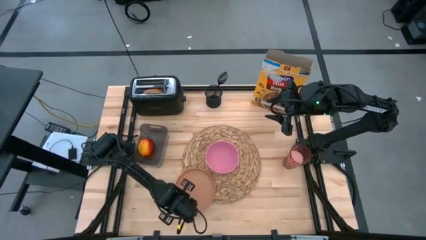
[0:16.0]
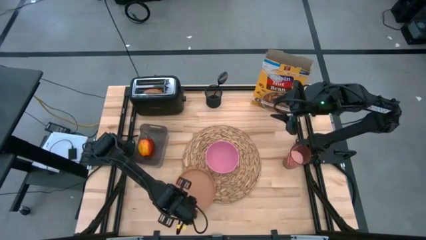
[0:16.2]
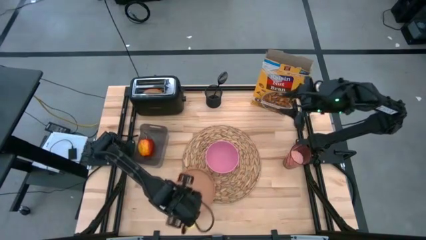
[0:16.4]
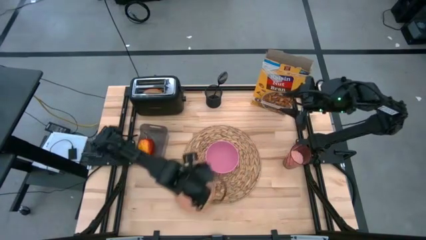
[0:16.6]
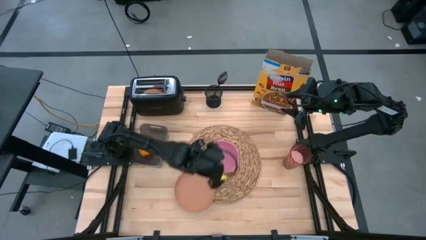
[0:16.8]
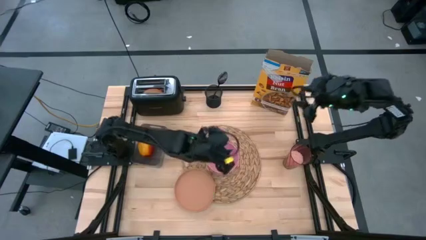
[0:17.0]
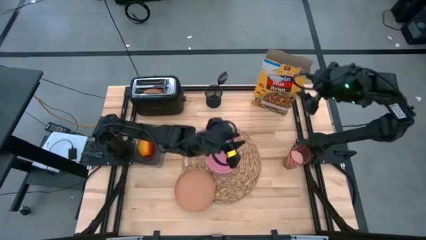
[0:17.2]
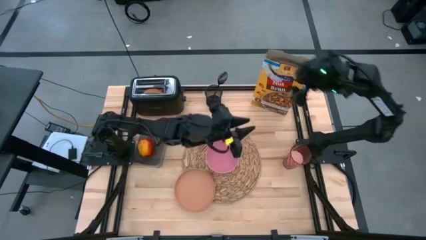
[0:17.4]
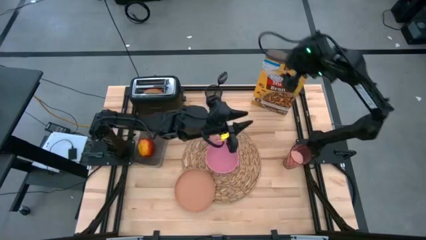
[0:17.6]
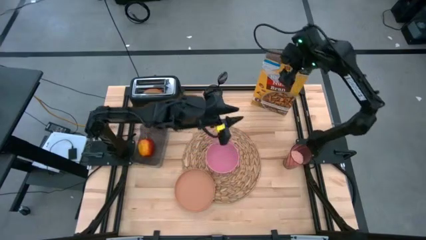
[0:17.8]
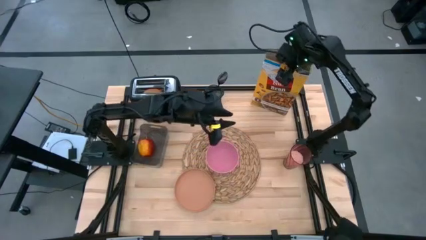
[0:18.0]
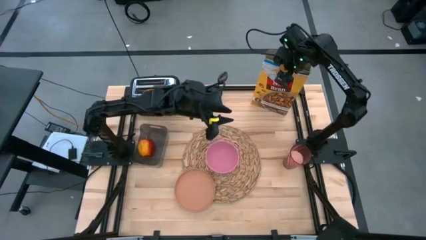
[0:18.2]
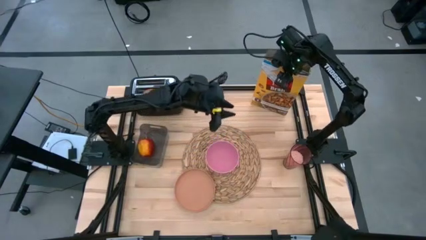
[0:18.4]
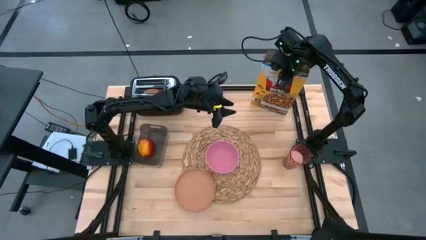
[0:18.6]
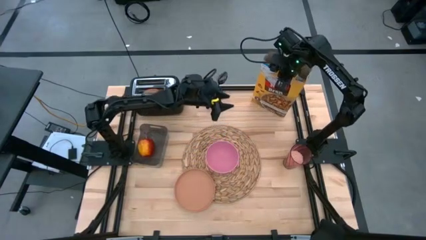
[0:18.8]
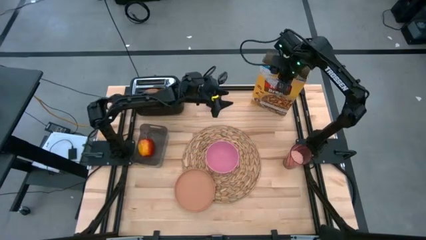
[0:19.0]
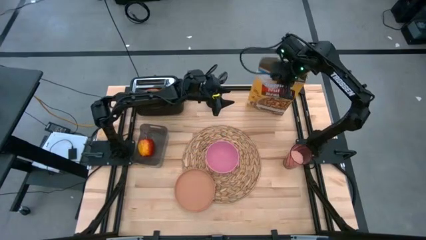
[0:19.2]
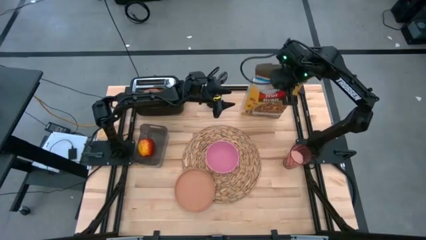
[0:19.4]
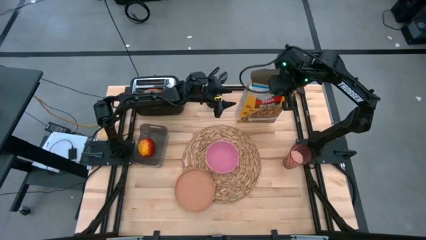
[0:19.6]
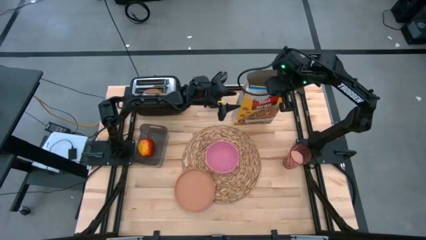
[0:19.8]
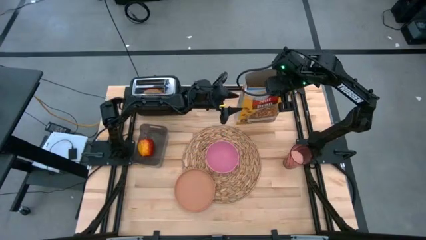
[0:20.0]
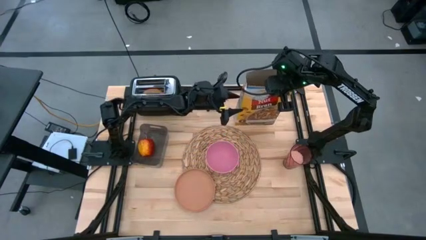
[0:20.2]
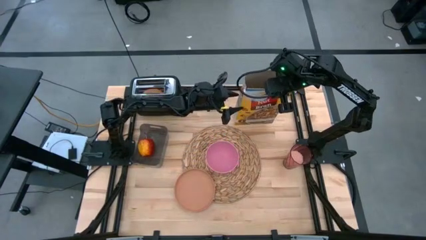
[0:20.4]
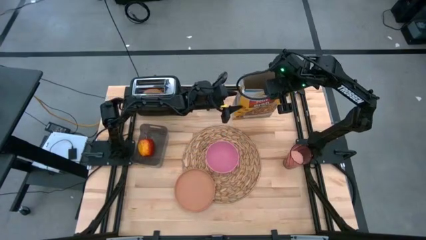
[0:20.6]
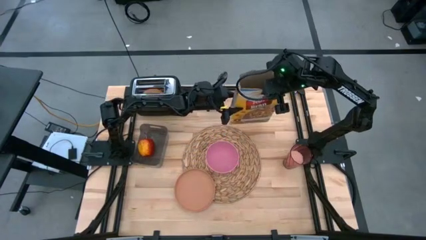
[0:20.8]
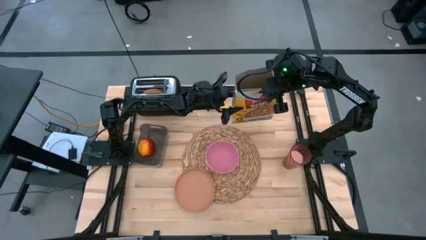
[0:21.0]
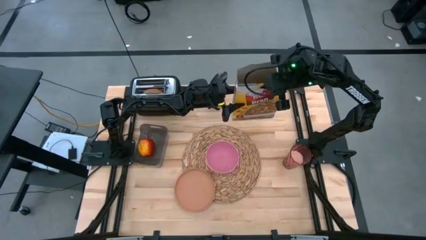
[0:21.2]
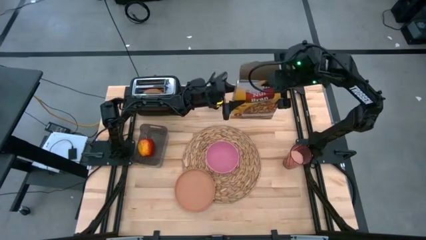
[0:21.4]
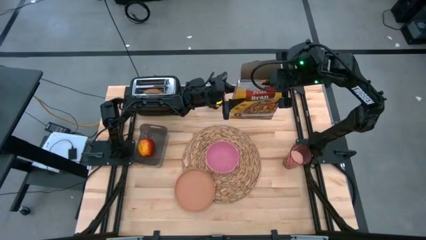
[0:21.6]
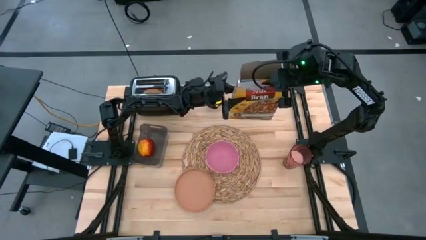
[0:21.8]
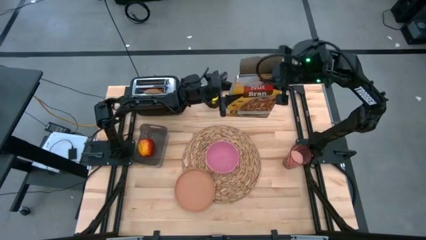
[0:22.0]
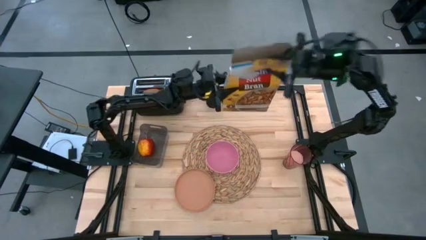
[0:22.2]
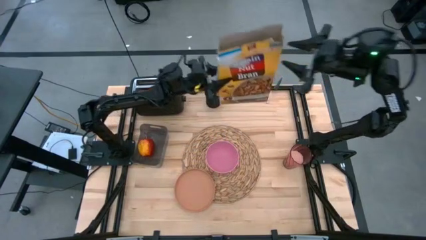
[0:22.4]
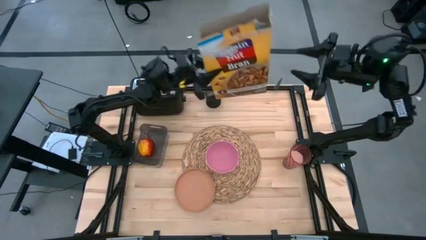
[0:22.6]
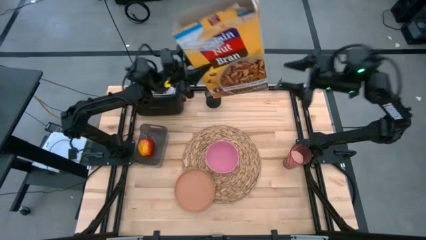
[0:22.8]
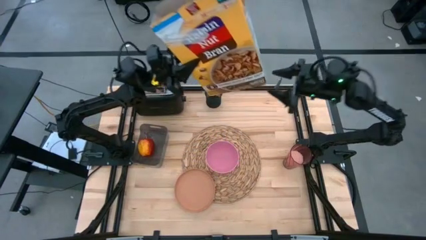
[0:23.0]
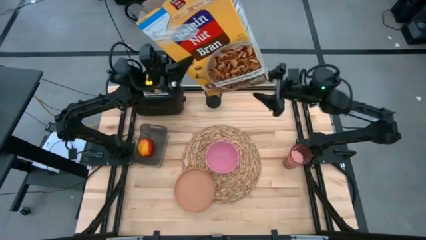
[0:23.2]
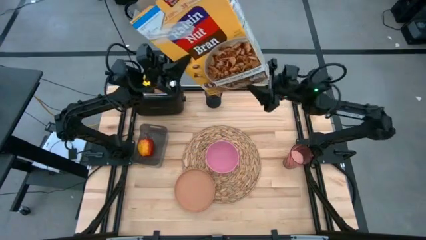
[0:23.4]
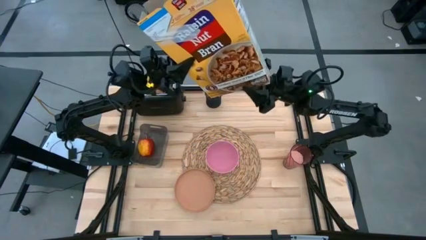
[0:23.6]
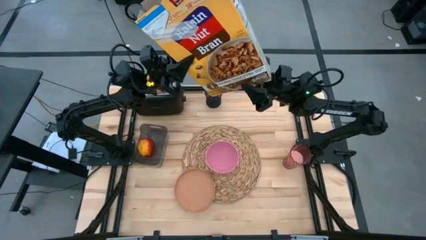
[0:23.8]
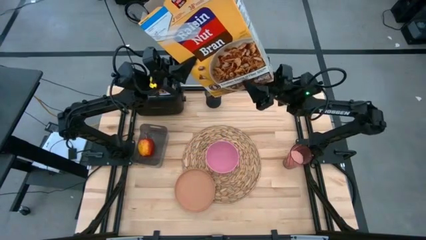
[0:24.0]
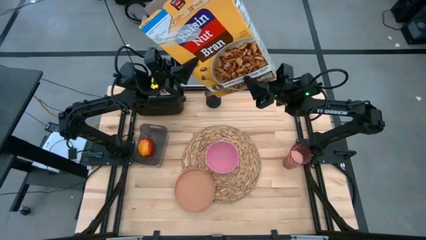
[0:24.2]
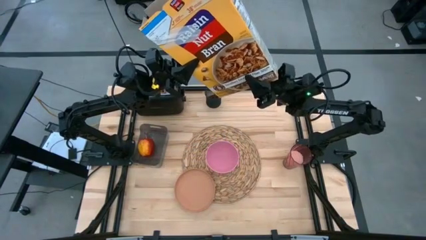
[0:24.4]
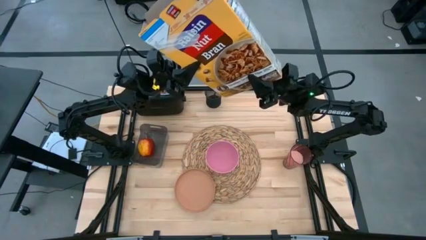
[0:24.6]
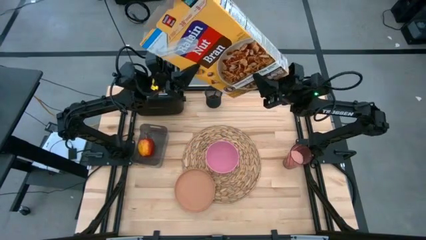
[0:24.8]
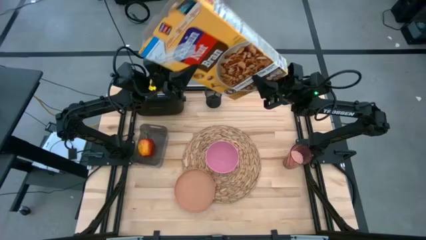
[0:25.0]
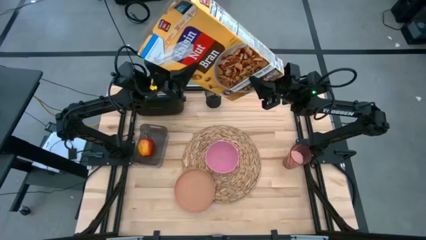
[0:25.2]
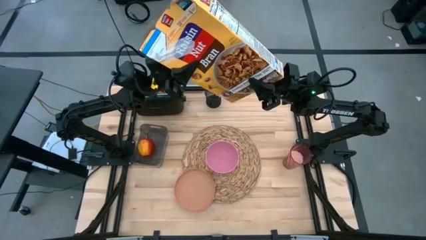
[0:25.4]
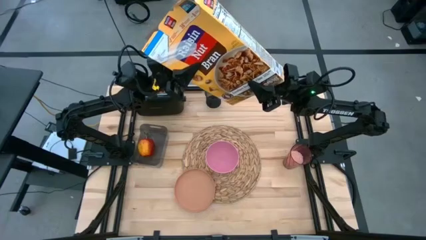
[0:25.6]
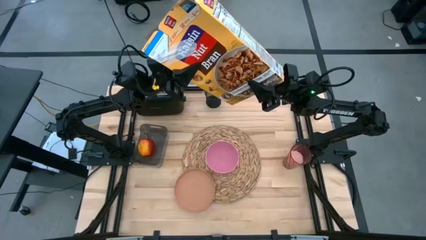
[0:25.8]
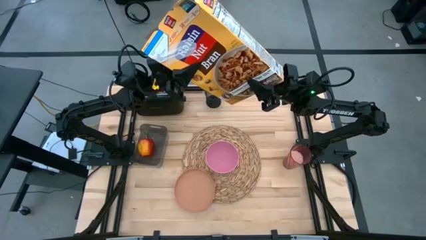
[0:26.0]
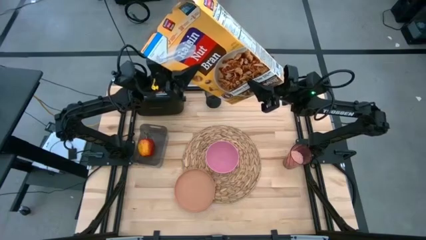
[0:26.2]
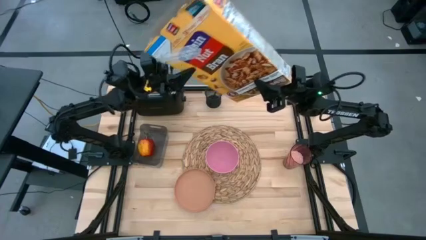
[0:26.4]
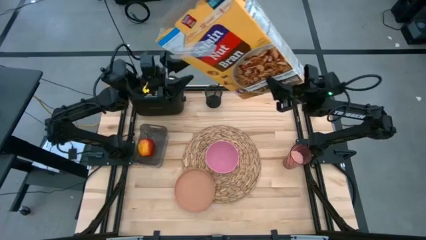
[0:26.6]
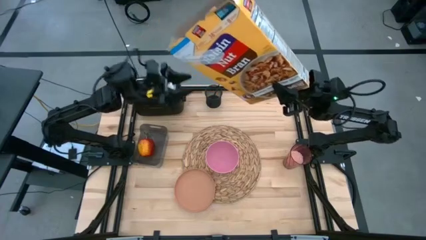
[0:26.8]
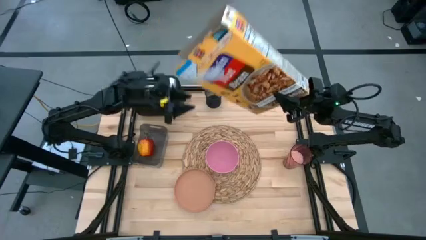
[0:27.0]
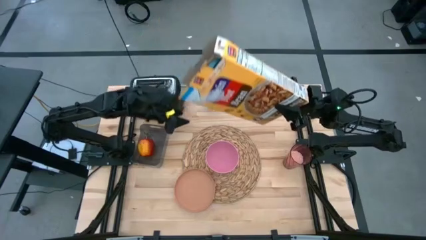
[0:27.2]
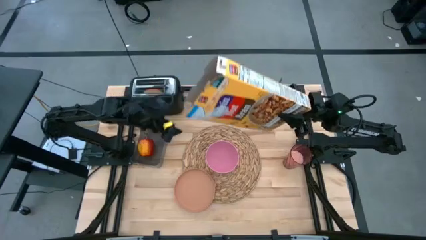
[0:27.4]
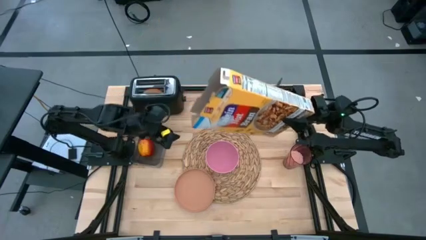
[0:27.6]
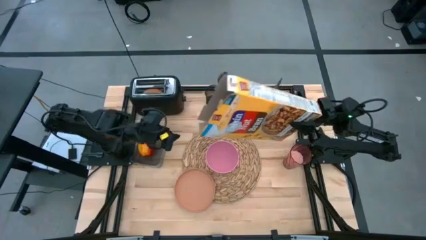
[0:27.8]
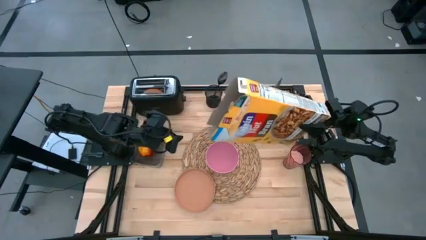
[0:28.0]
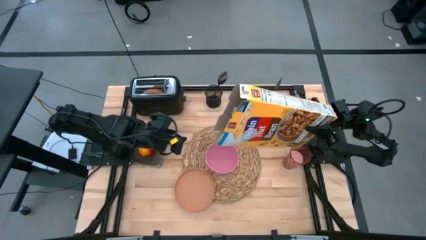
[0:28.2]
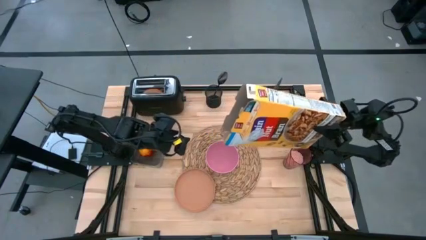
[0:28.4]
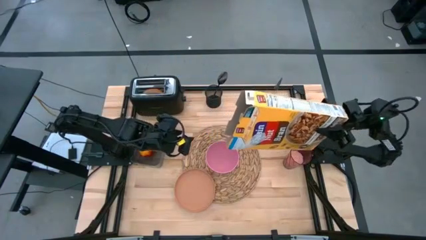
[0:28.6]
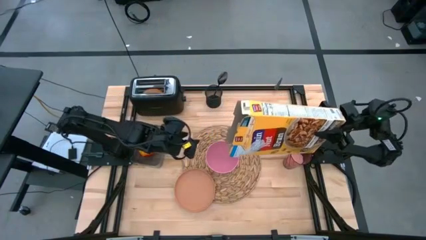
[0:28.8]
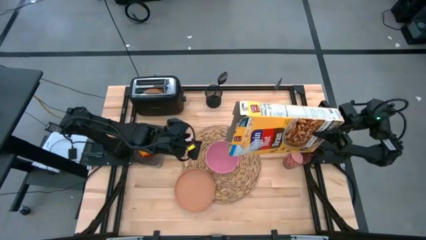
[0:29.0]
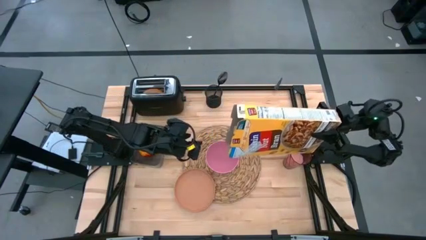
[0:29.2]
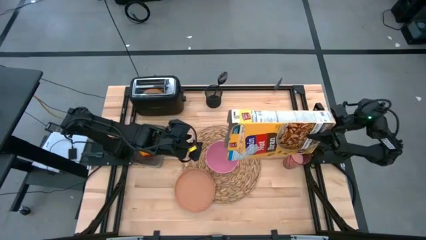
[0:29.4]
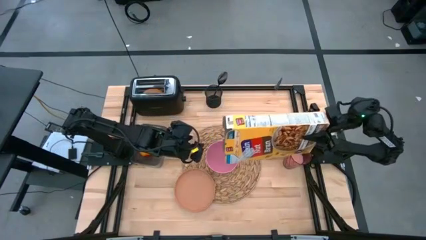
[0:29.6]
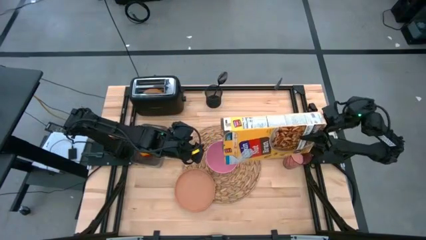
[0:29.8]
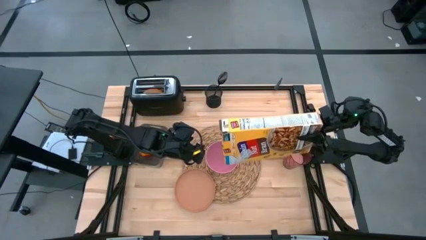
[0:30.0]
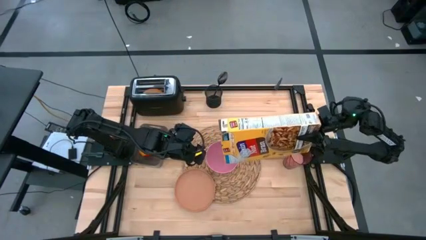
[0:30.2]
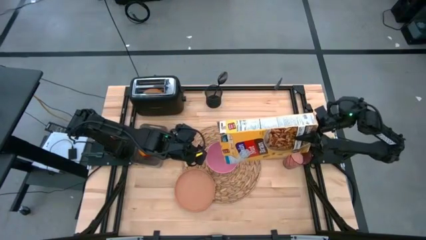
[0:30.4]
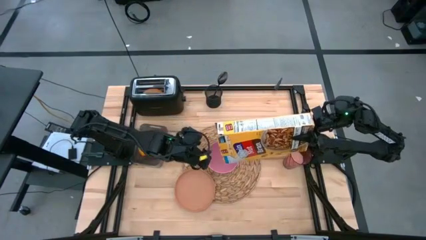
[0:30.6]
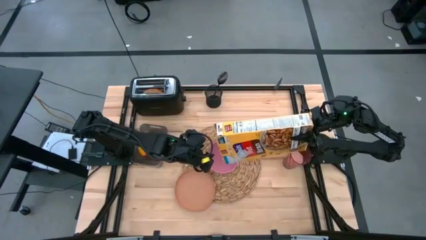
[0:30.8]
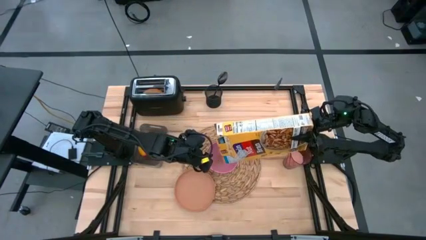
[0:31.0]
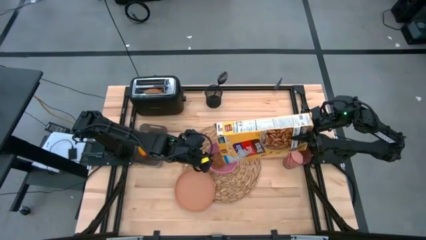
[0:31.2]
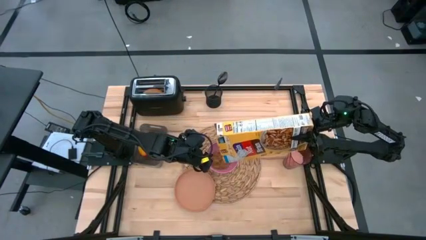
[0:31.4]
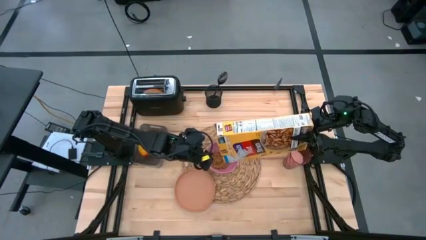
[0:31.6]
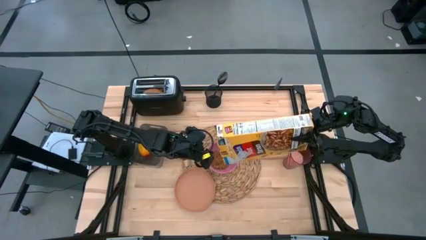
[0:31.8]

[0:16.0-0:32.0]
Task: Arrange a breakfast setting
Pour the cereal from the yellow cereal box into the pink bowl
